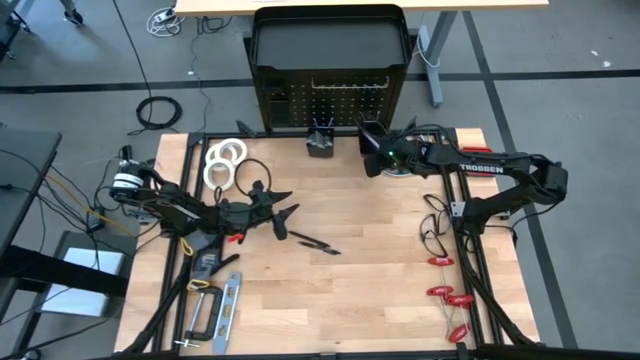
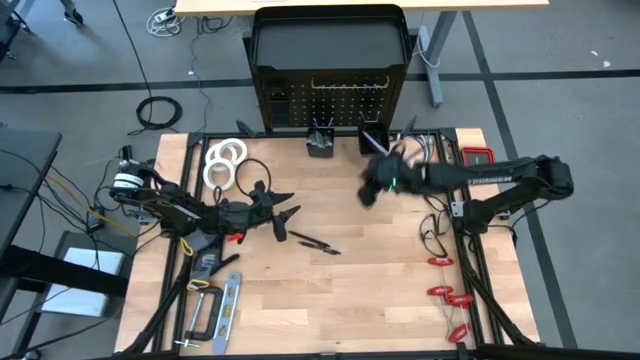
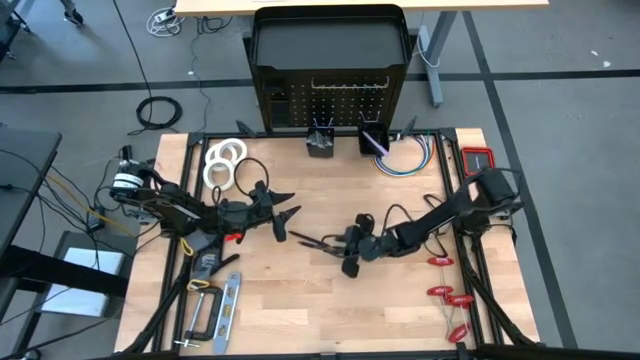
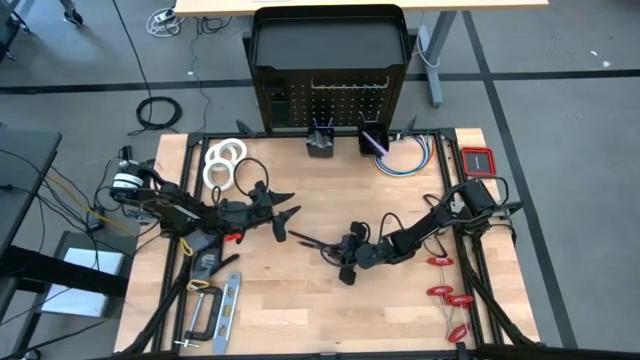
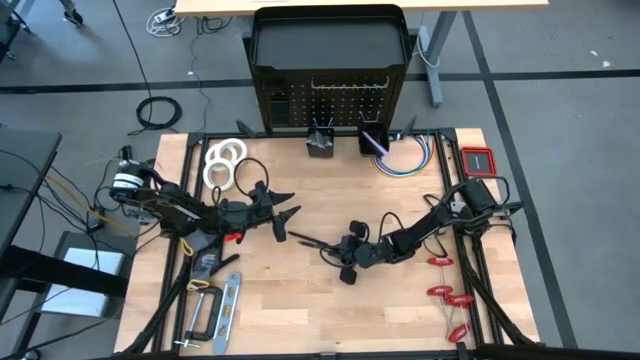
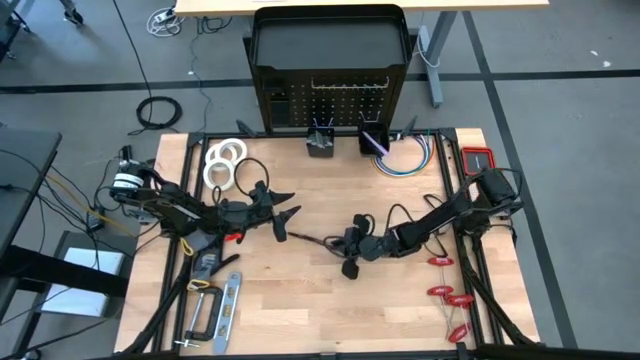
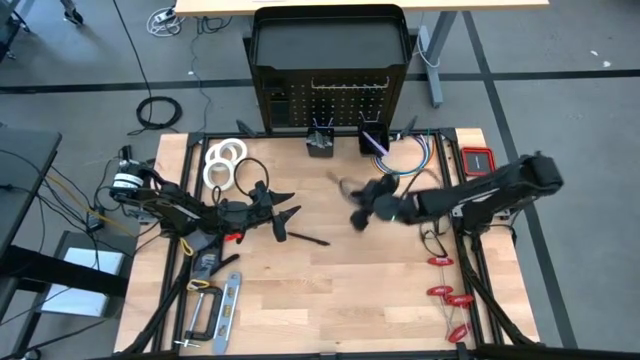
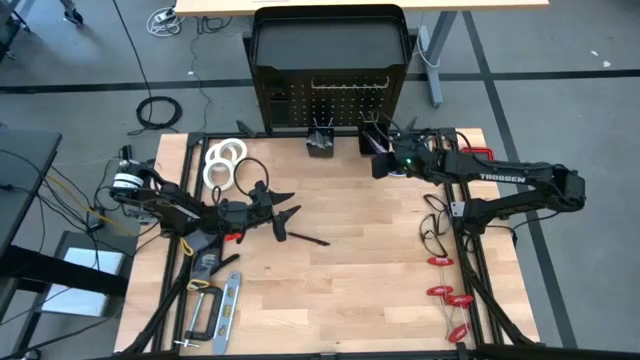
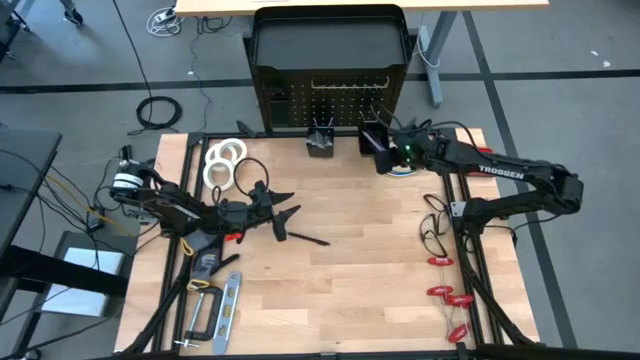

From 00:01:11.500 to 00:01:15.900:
Task: Hang tools onto peg board
Put the black pen into the right peg board bin

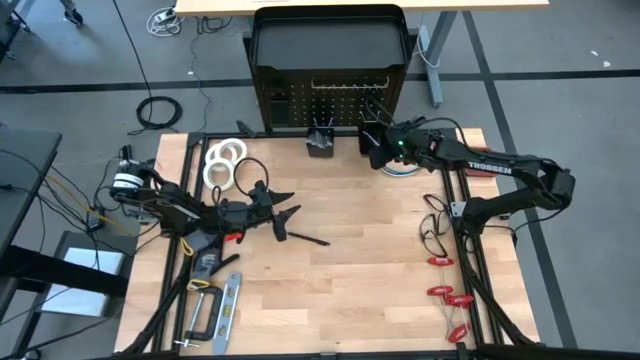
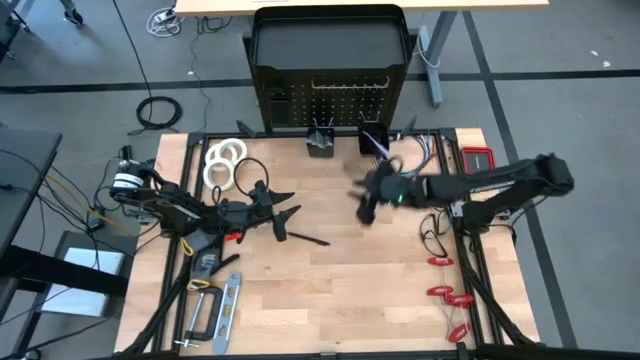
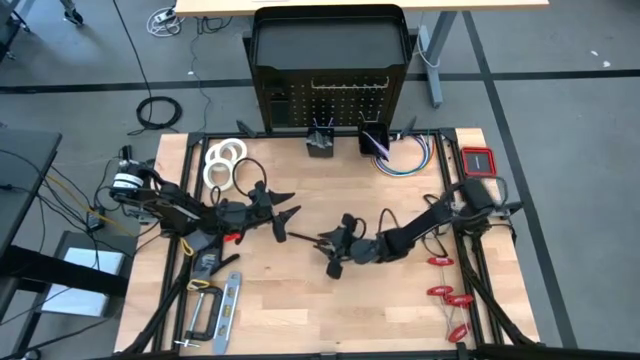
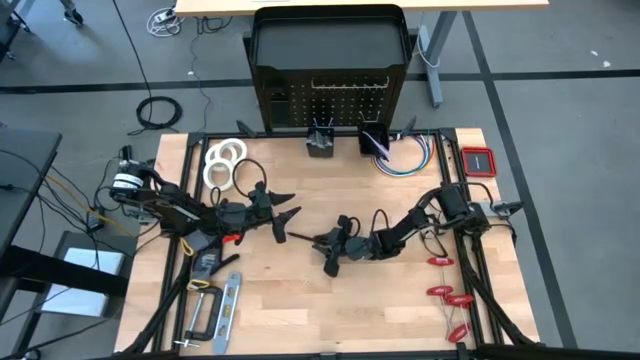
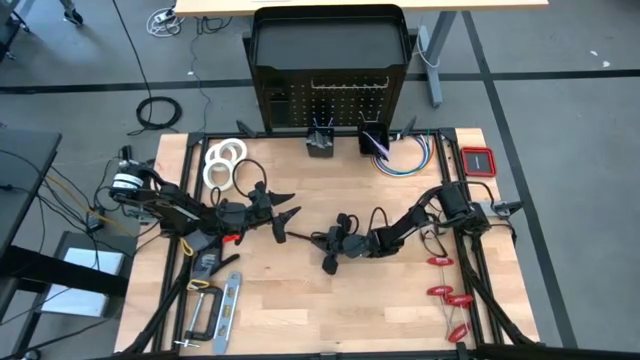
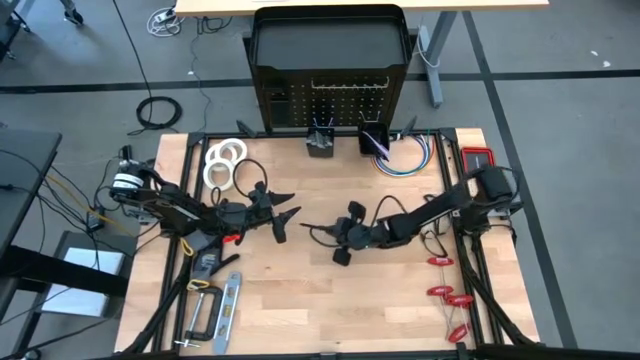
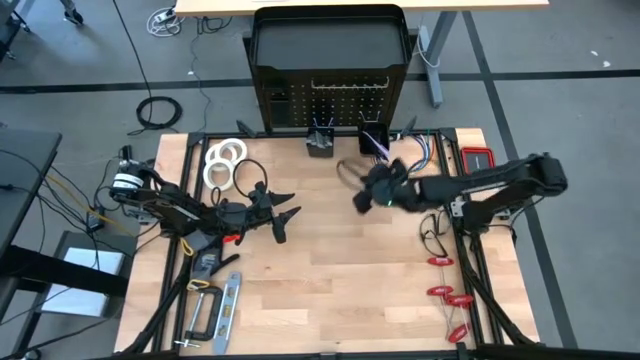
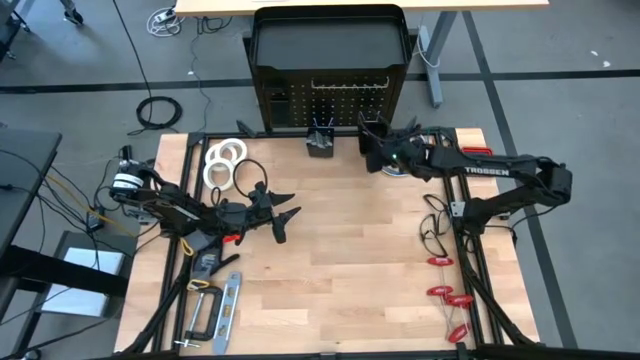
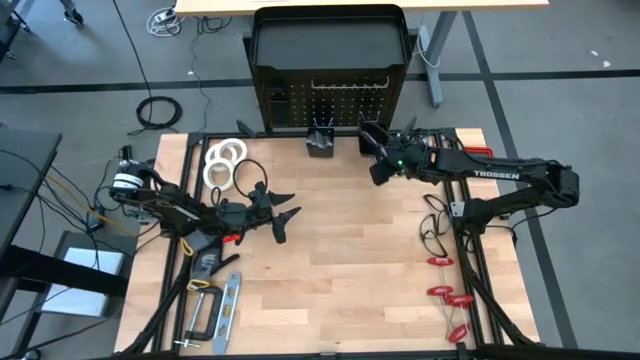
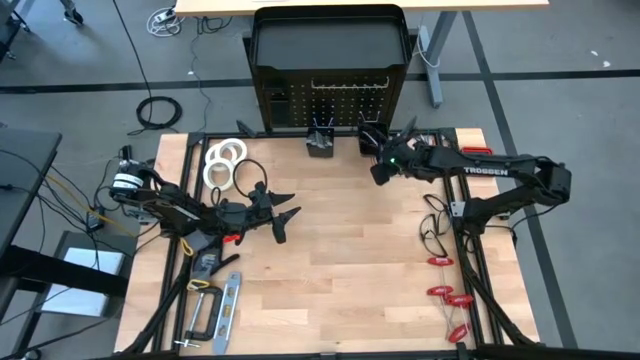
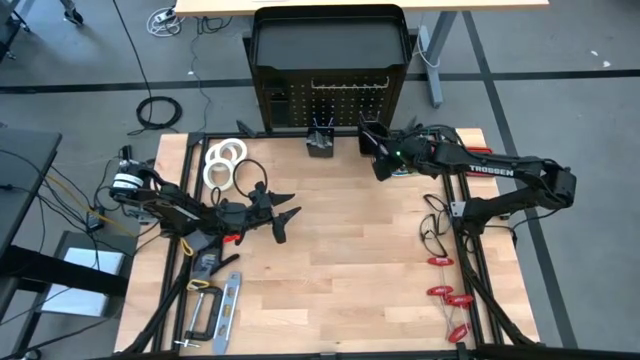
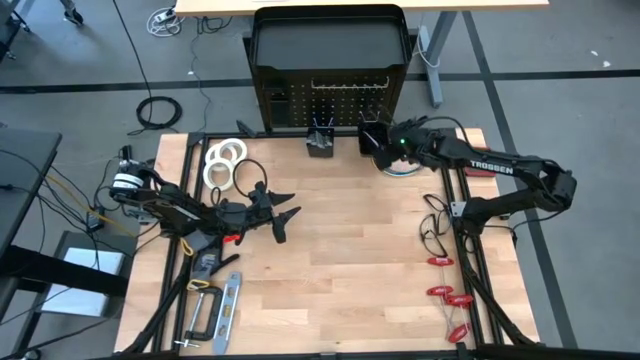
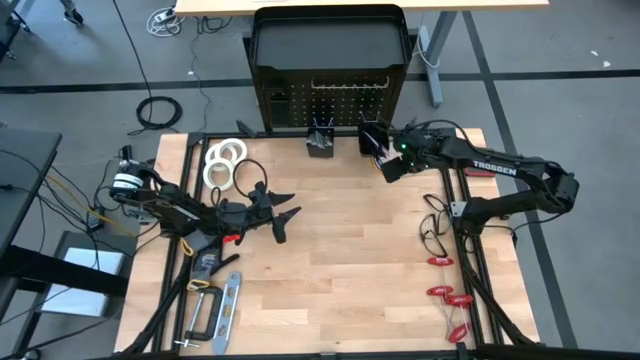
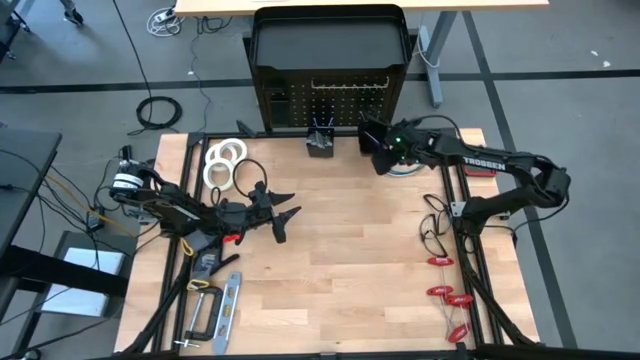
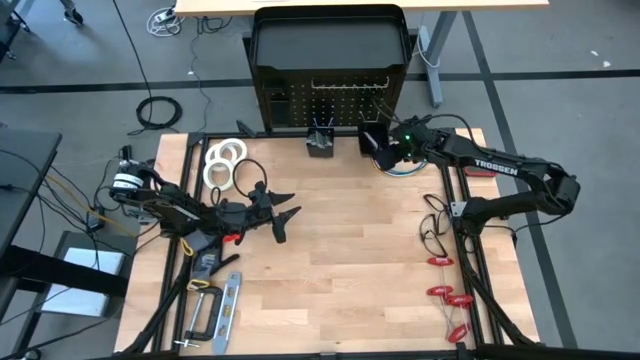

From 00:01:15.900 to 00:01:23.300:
Put the black pen into the right peg board bin

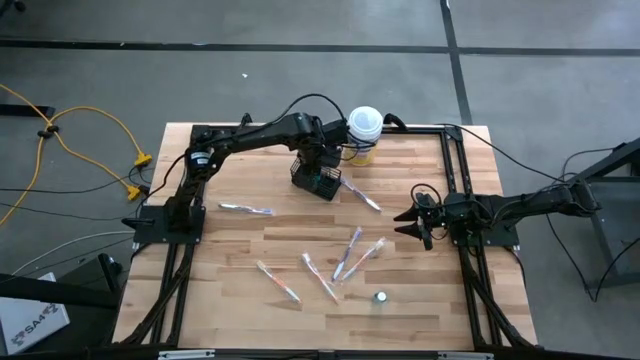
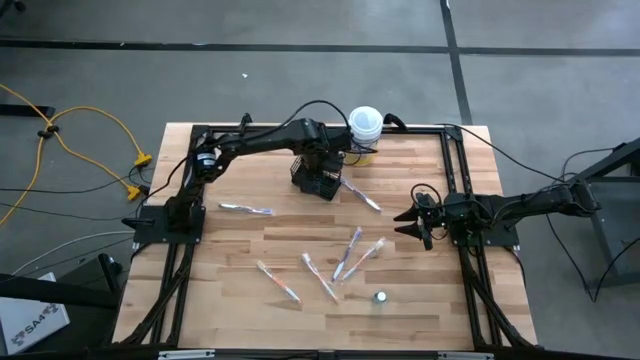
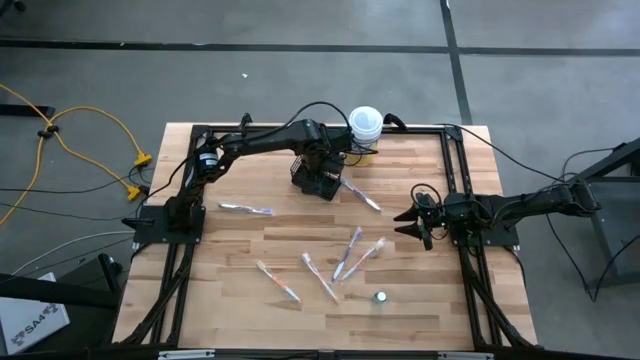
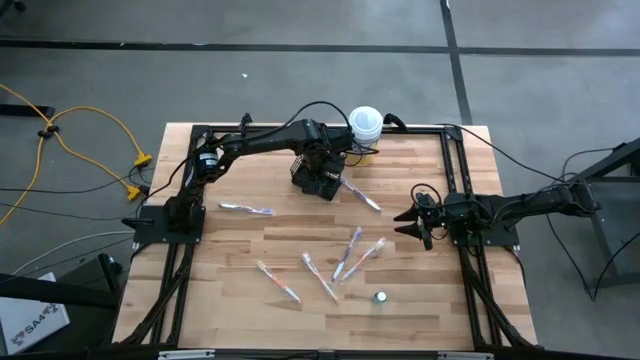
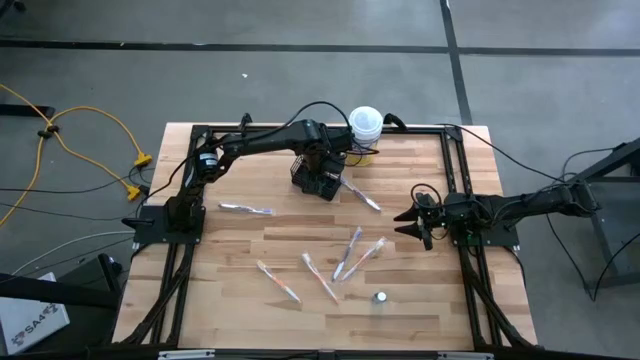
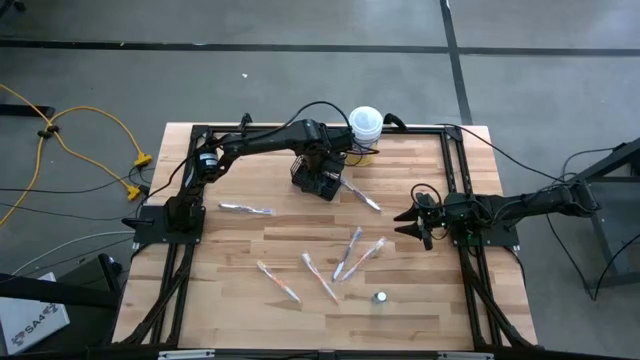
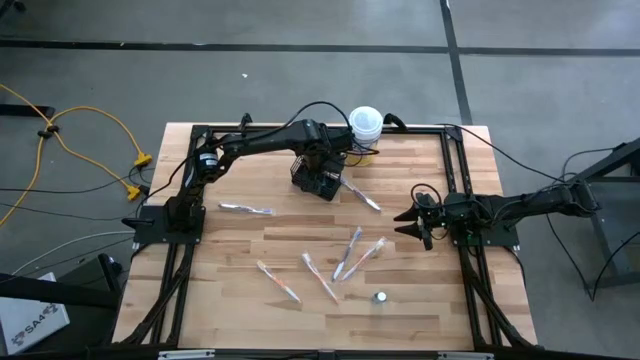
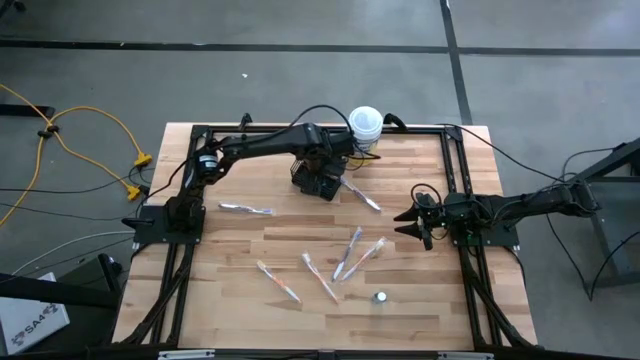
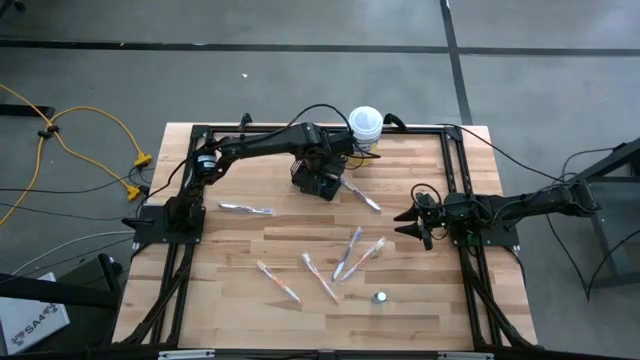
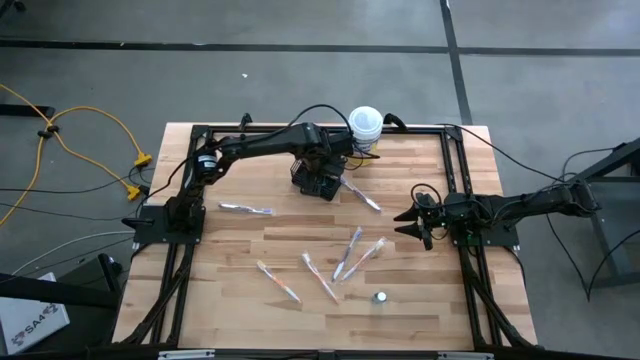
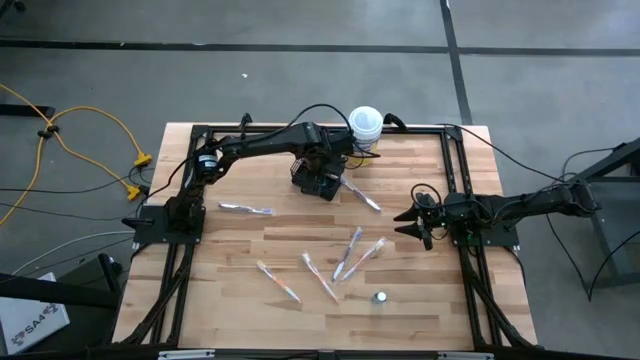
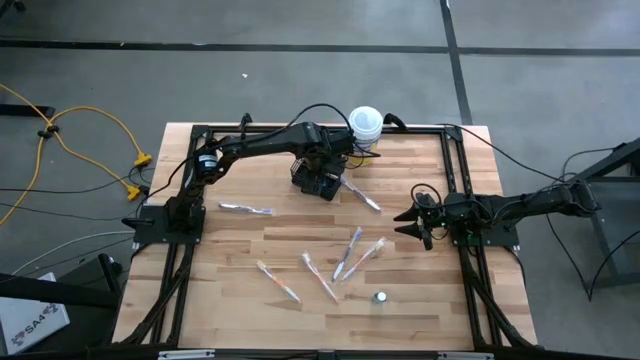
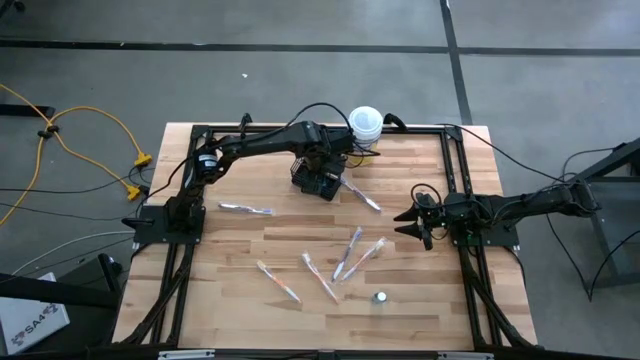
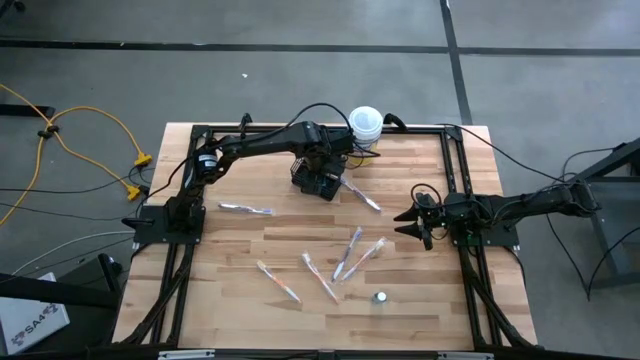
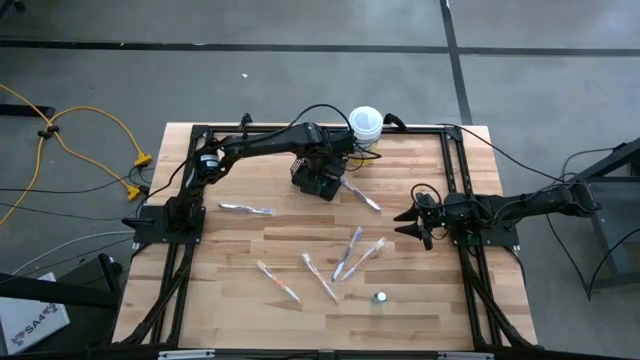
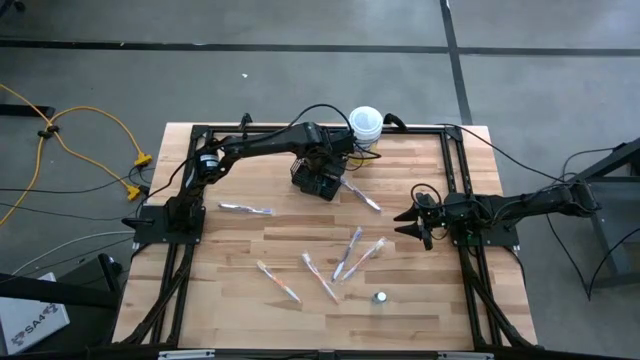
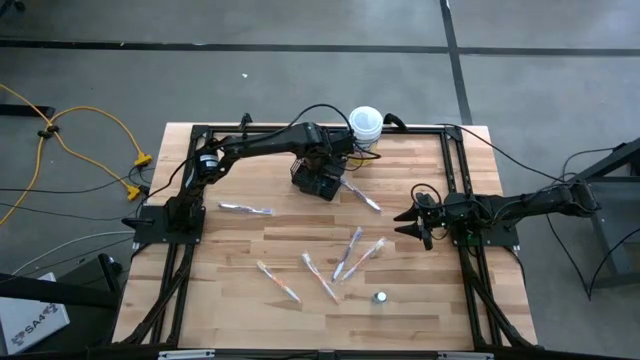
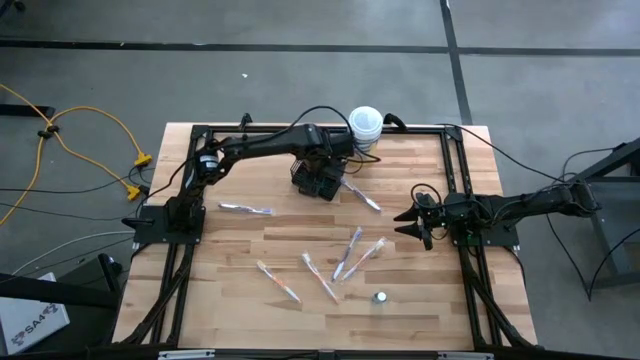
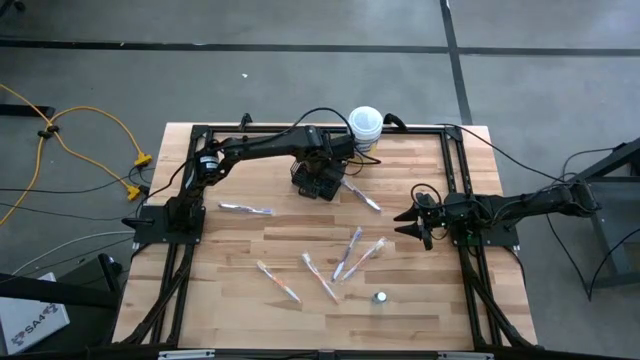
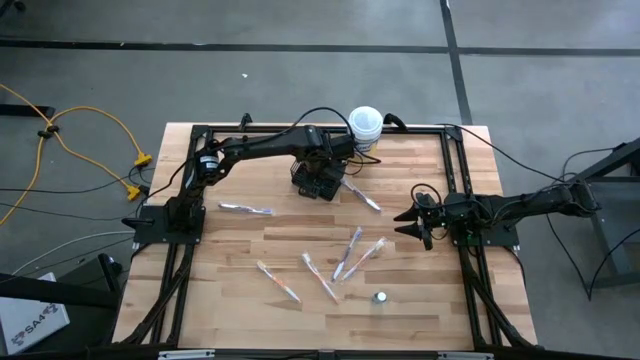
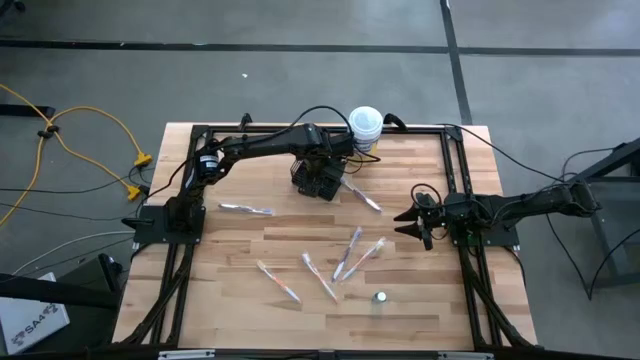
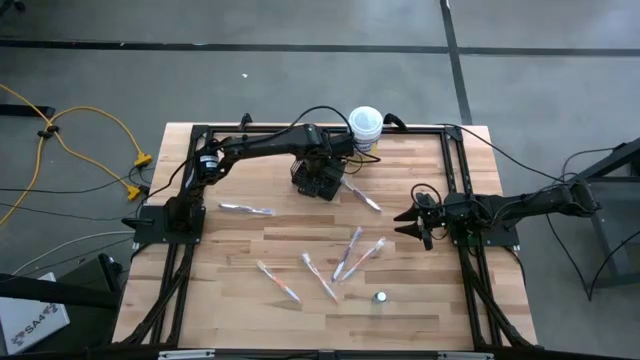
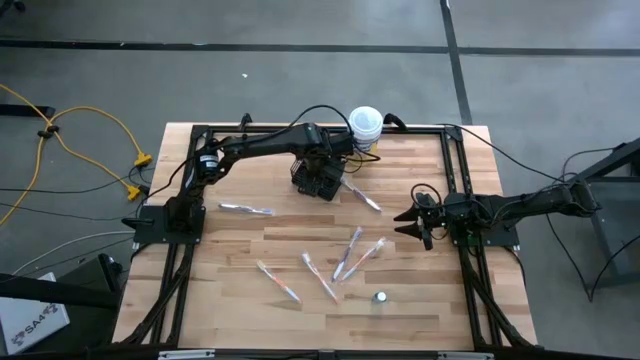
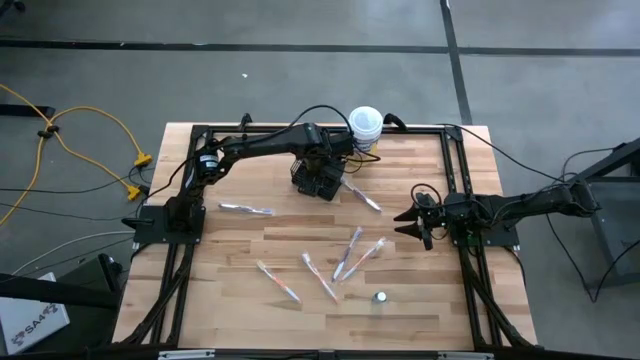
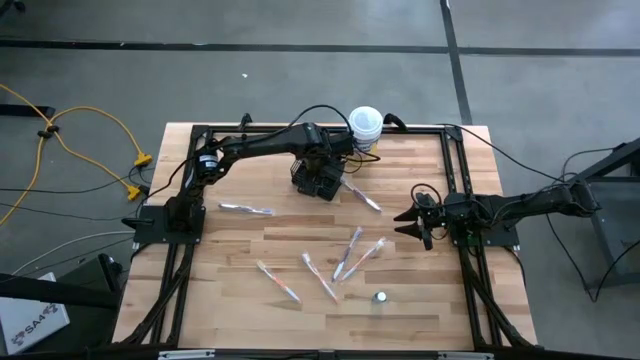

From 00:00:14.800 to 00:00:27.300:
Task: Pick & Place toothbrushing station
Put the top blue mouthwash into the black mesh organizer
